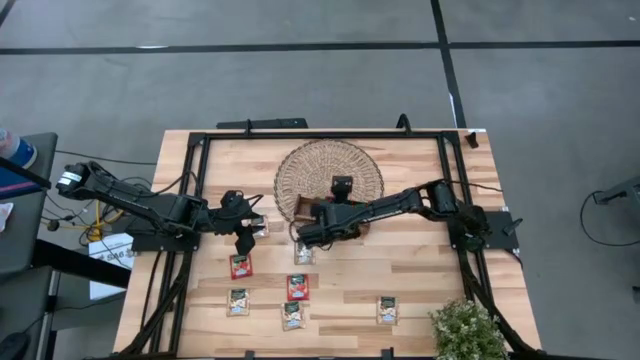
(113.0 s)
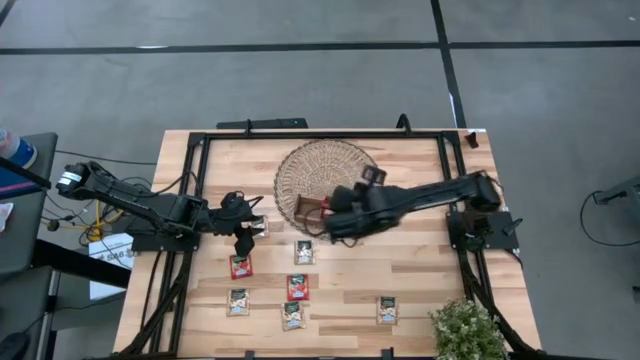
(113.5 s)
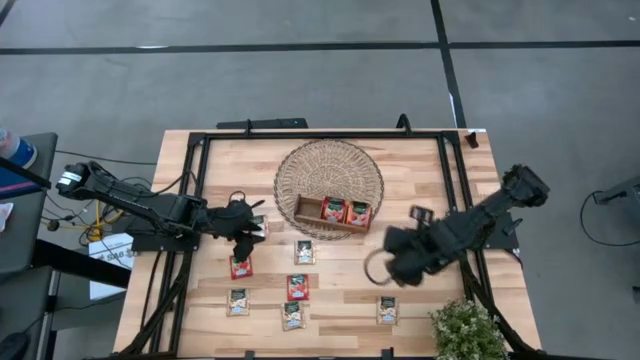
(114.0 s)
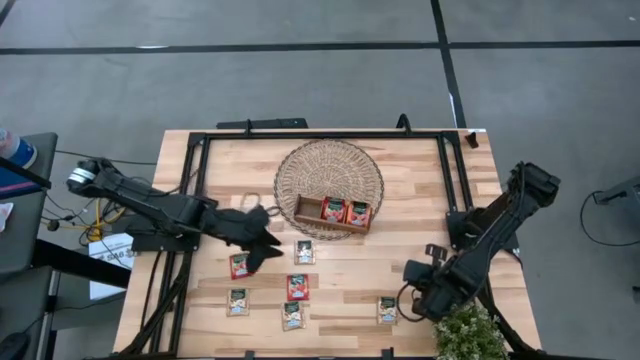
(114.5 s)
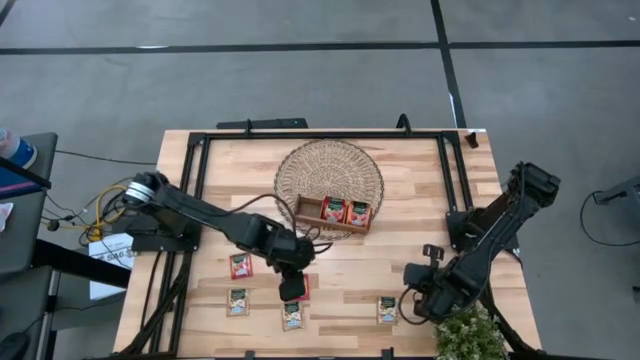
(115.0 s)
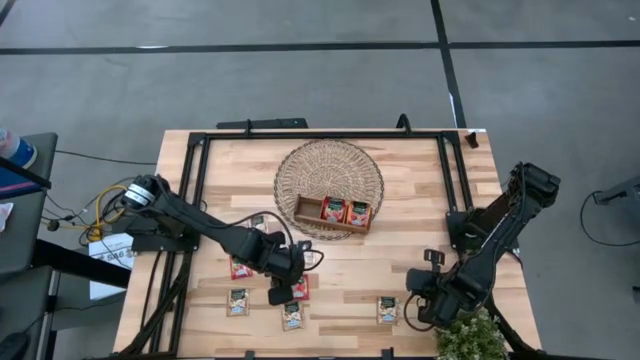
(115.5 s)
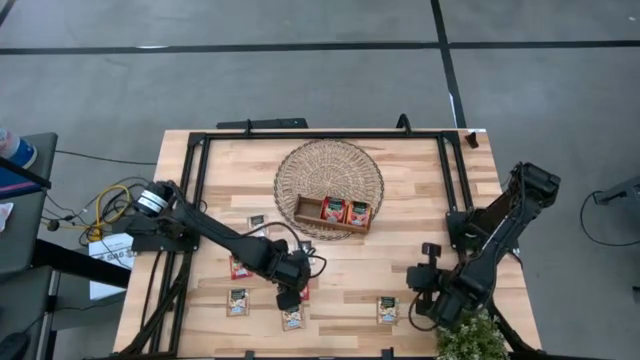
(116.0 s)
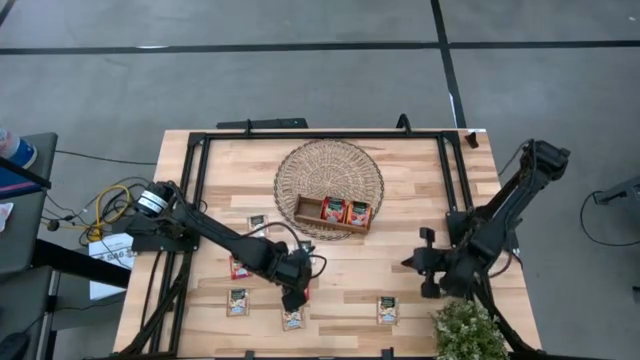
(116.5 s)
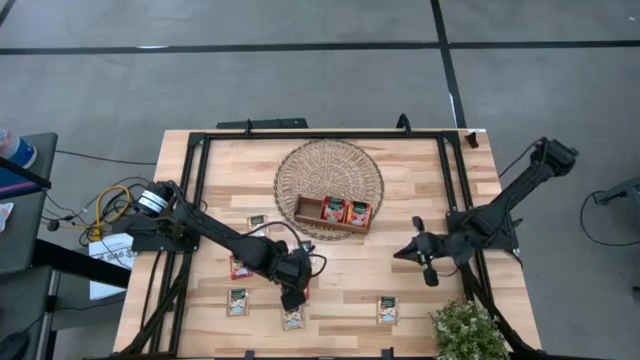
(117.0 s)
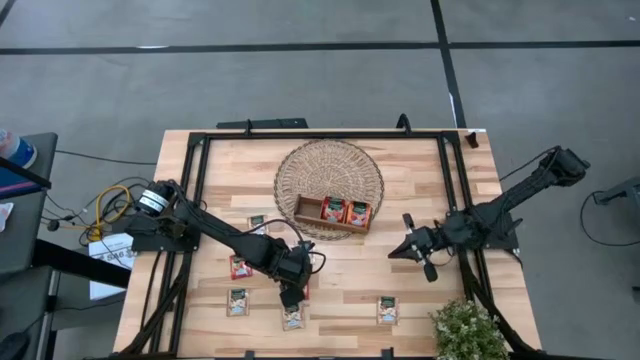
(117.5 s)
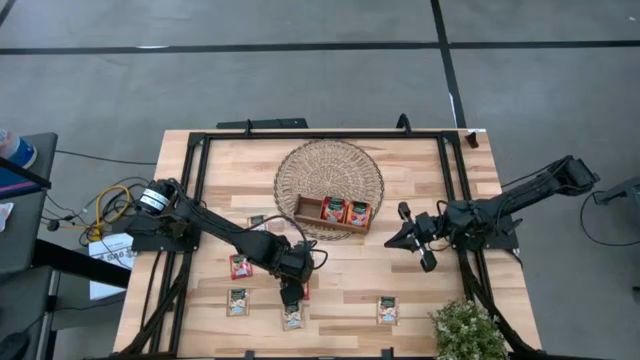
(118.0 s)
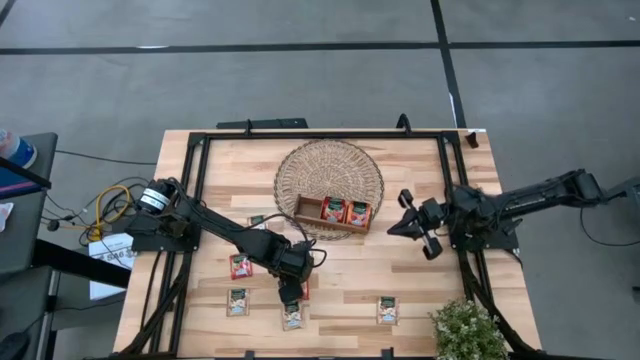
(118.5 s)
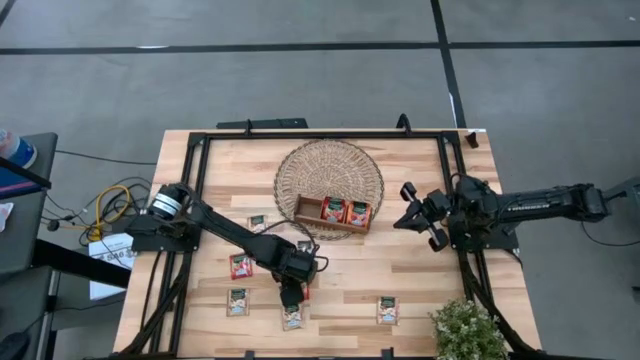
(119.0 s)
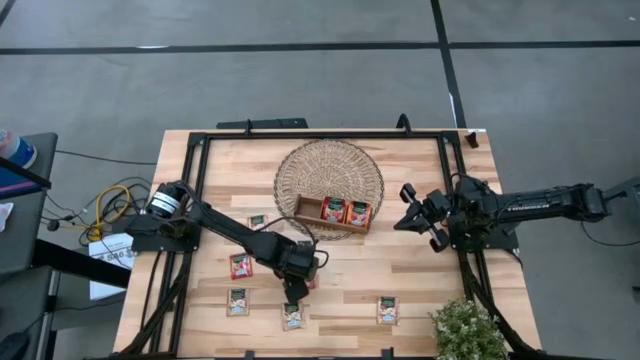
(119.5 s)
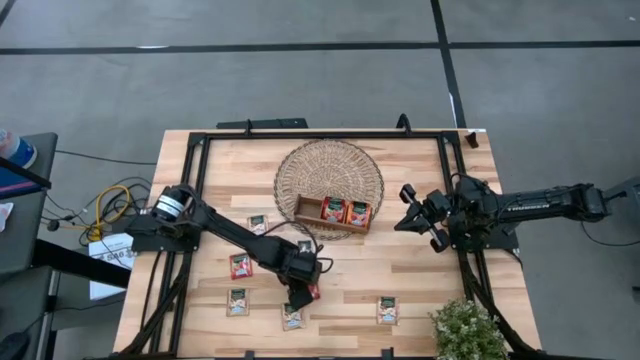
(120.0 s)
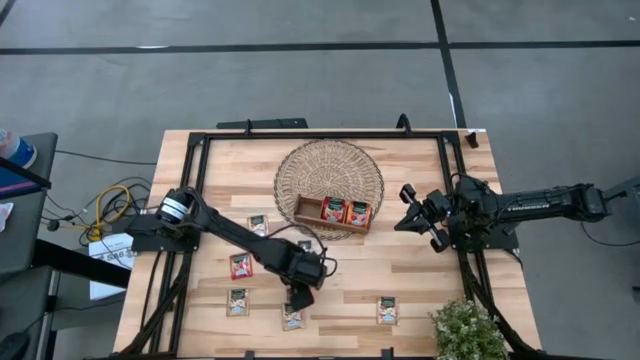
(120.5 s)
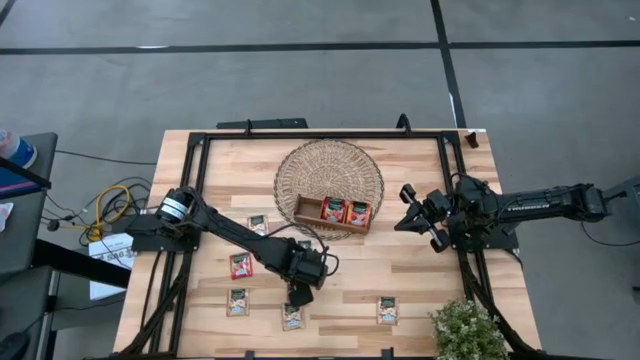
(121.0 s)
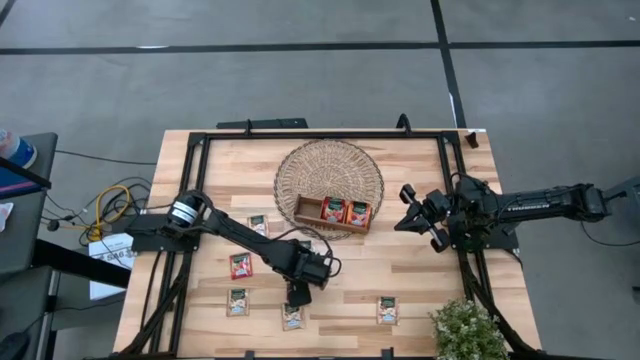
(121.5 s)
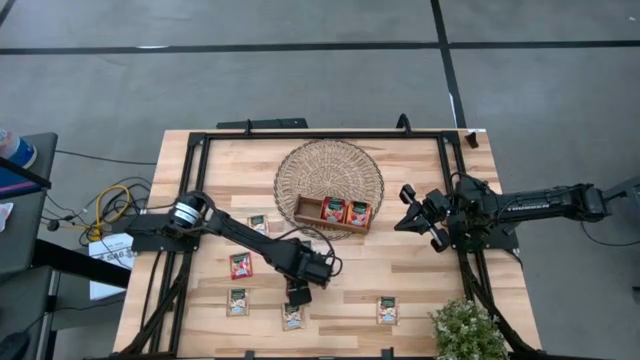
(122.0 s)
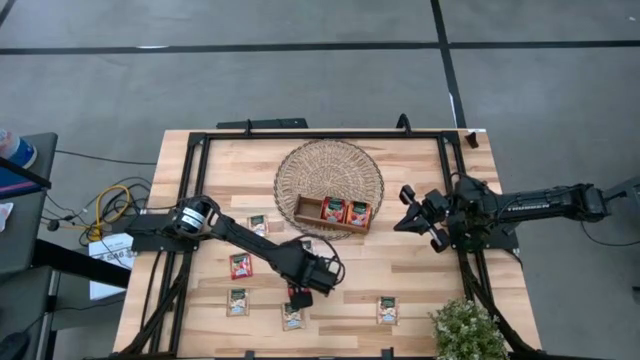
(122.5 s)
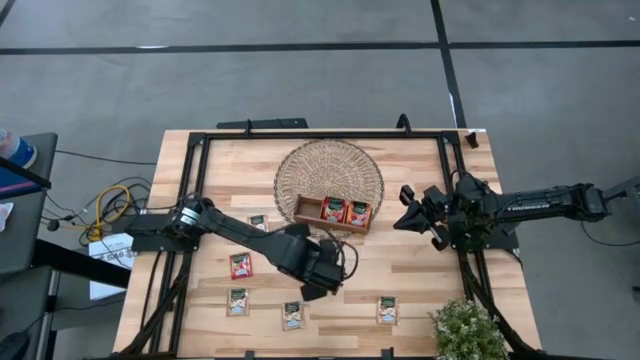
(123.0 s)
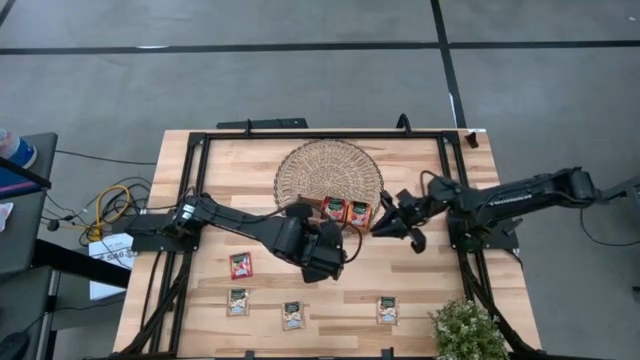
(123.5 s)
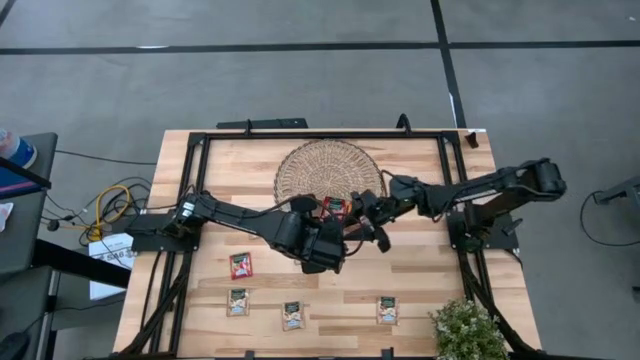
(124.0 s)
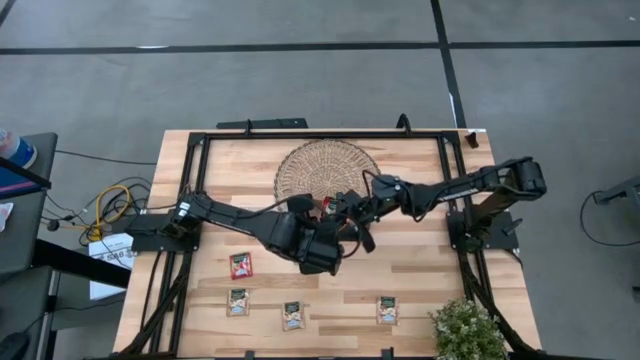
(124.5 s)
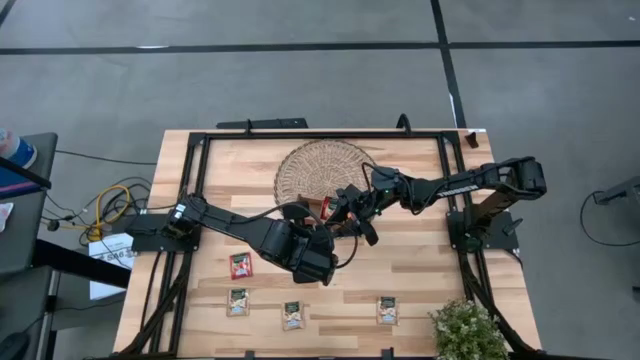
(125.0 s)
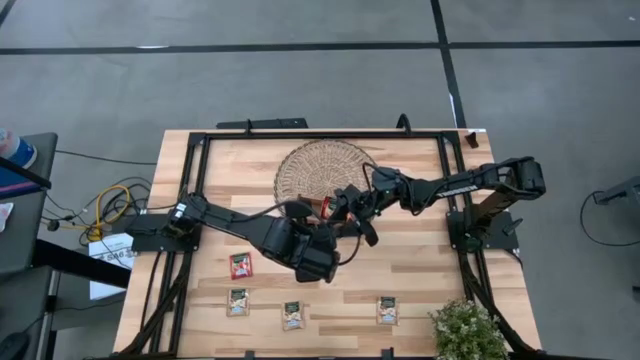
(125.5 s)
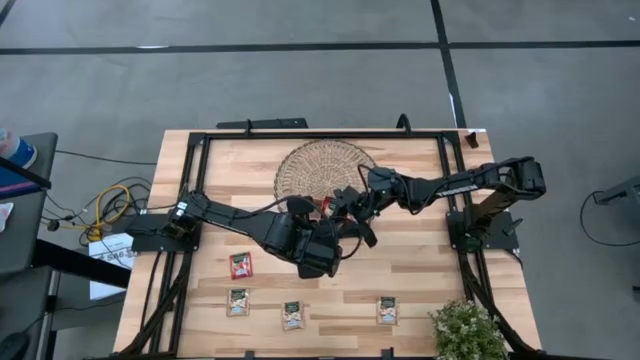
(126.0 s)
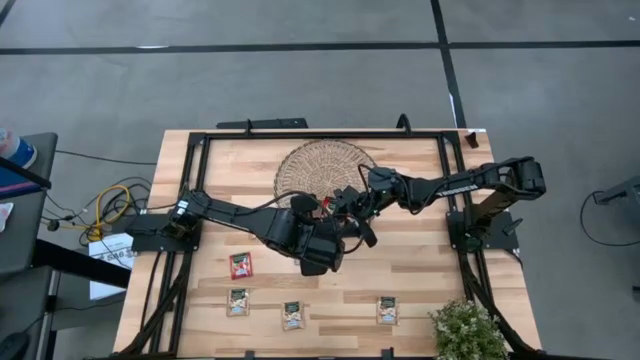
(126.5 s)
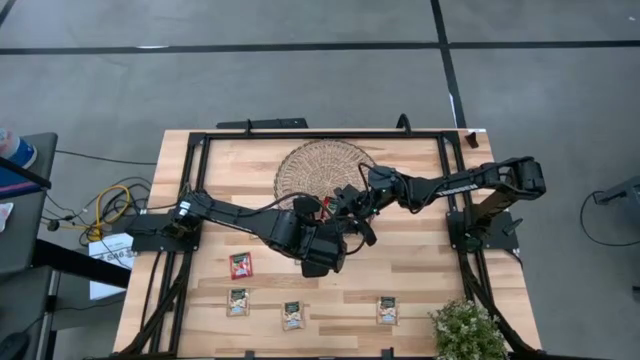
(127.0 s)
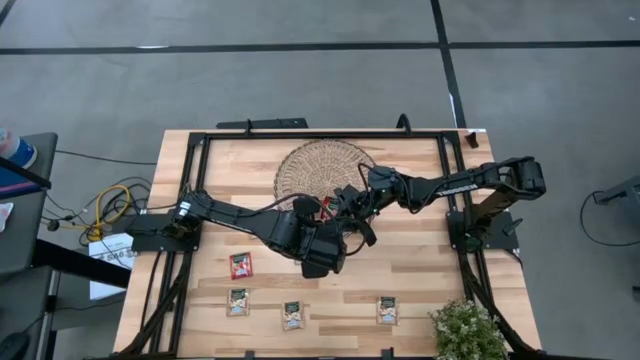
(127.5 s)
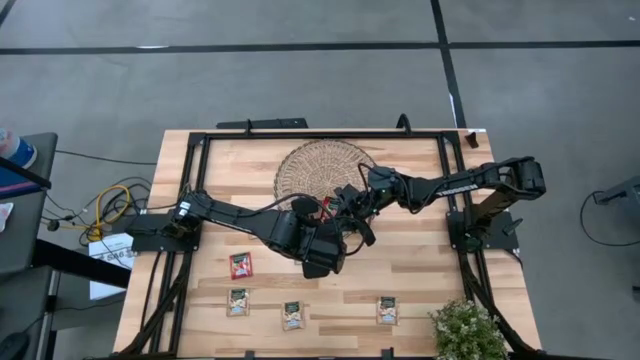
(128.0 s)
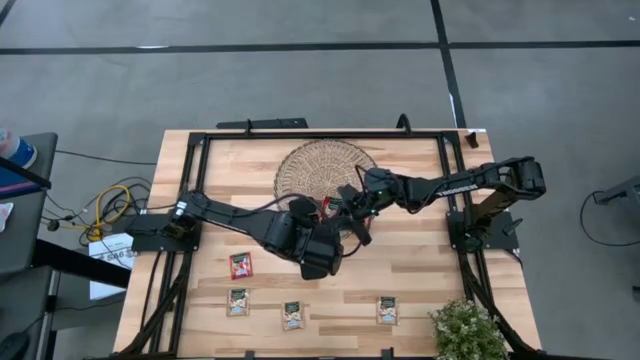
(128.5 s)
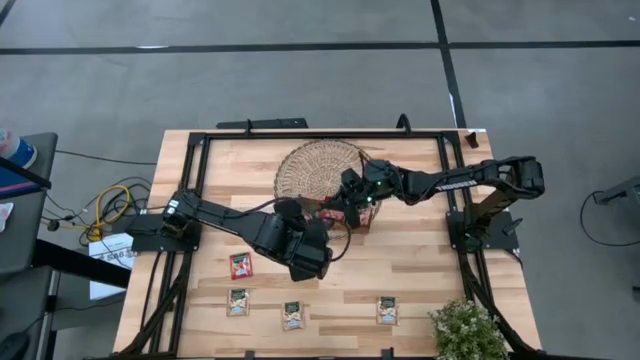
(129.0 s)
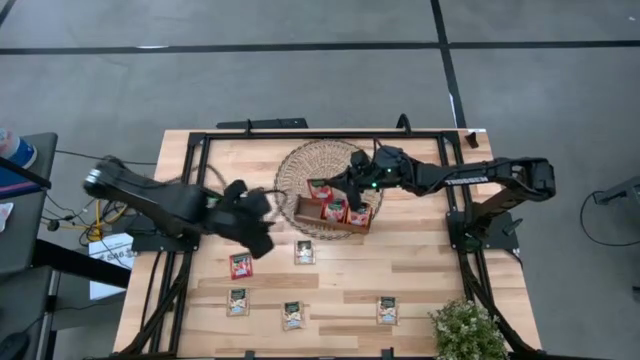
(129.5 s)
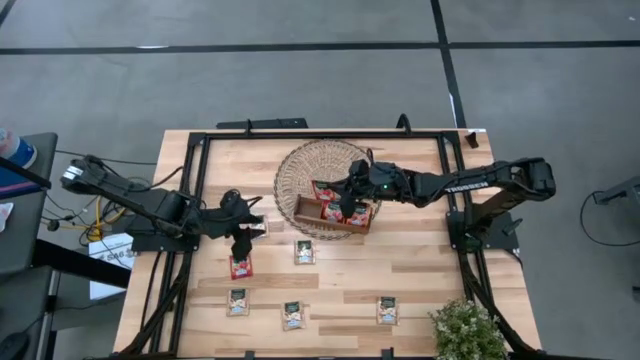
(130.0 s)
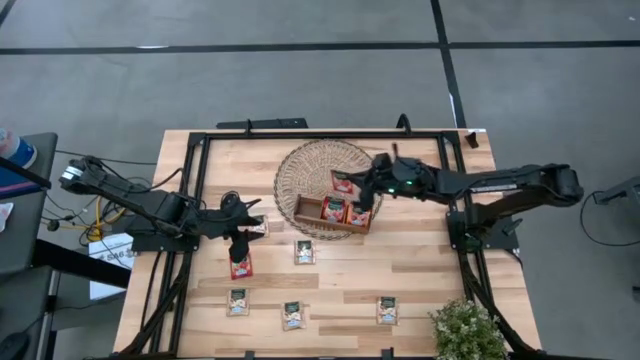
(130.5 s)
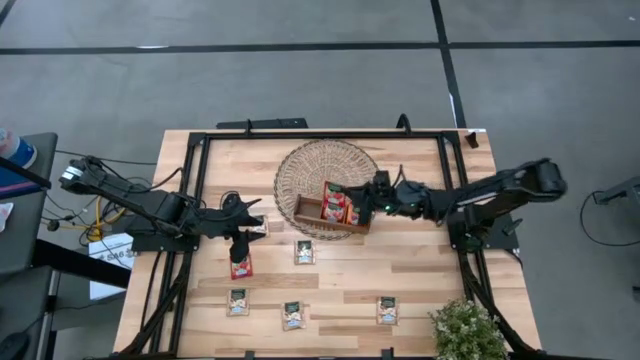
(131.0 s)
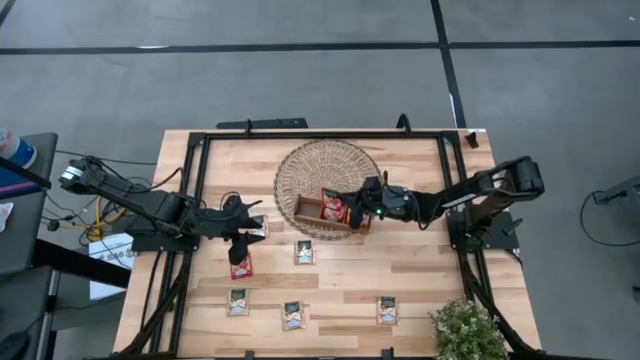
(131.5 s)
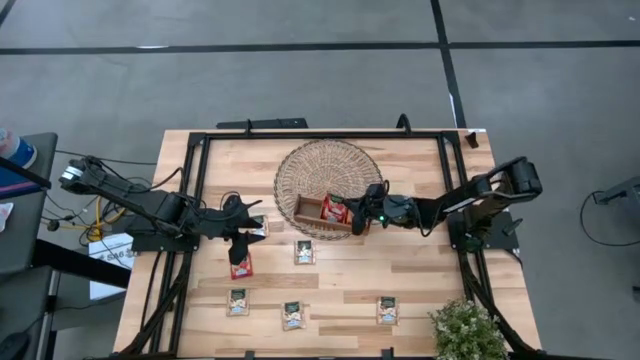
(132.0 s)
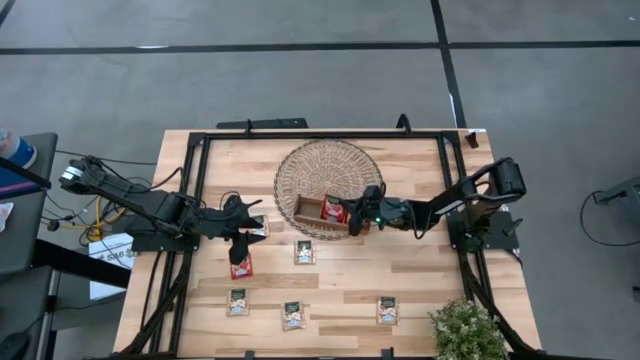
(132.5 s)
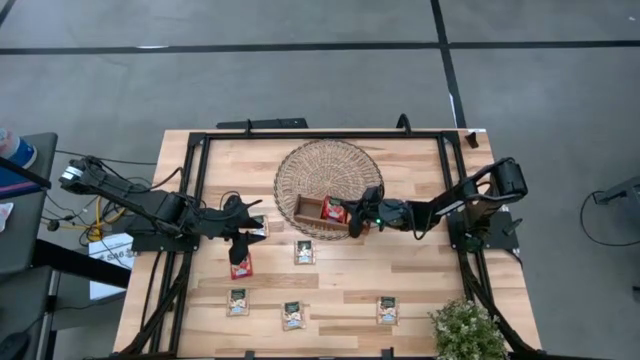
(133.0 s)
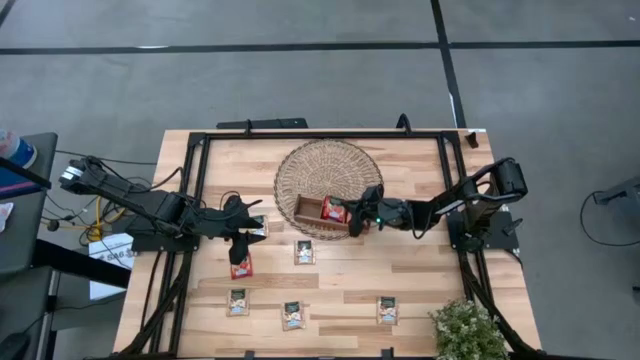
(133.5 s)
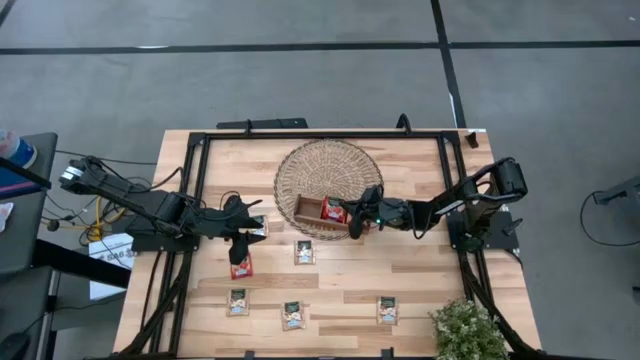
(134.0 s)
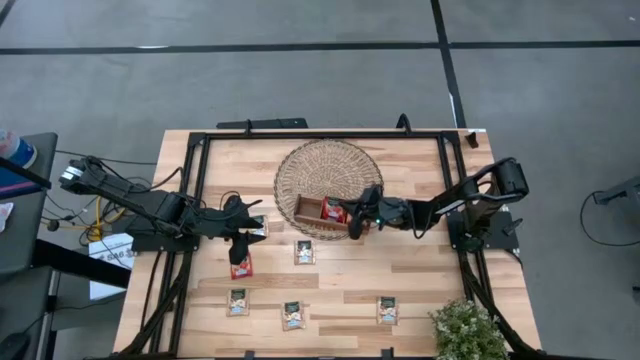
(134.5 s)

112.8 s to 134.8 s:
Task: Pick & Place Tea
Put the red tea bag into the middle section of the wooden organizer
